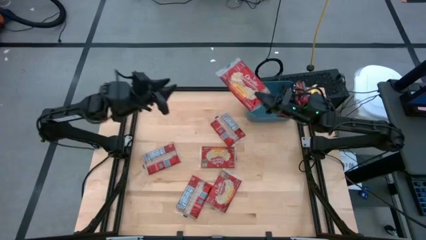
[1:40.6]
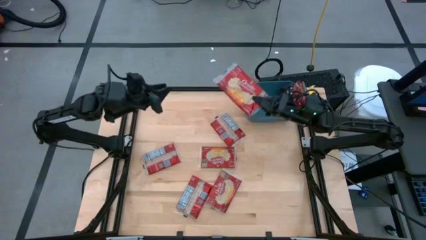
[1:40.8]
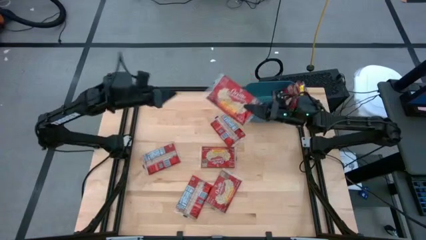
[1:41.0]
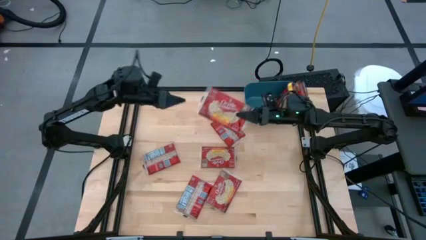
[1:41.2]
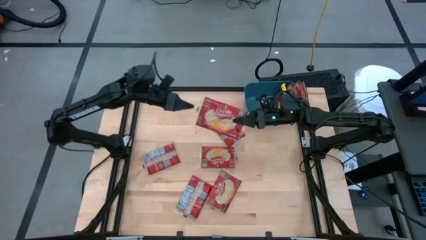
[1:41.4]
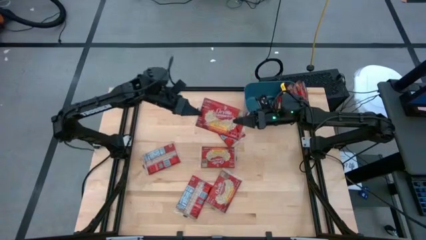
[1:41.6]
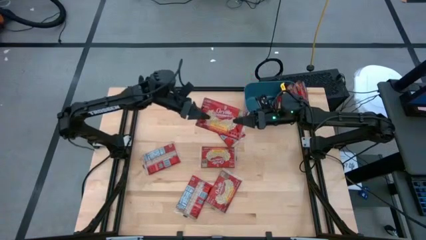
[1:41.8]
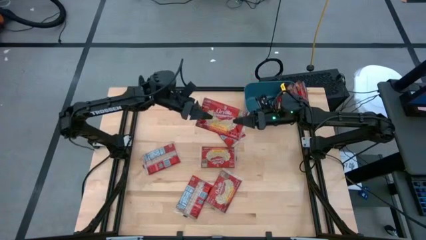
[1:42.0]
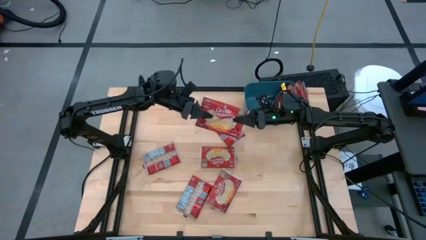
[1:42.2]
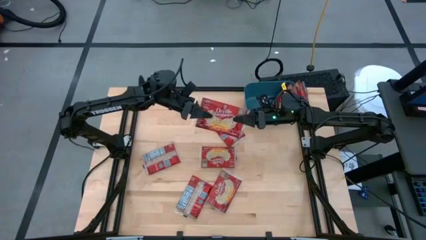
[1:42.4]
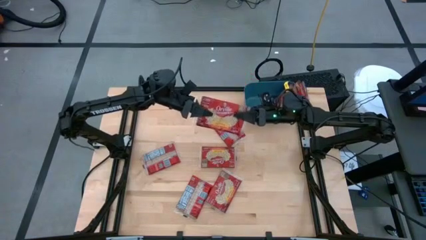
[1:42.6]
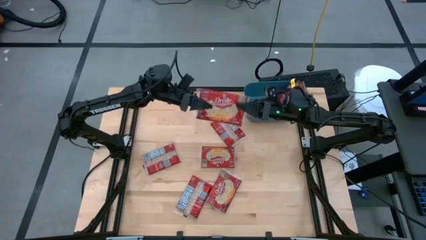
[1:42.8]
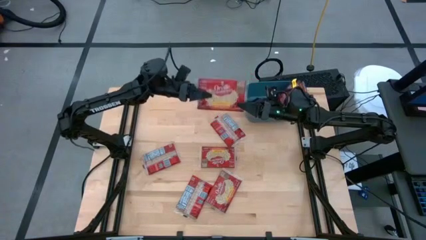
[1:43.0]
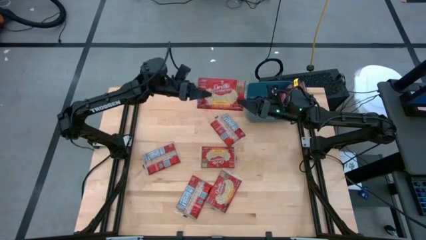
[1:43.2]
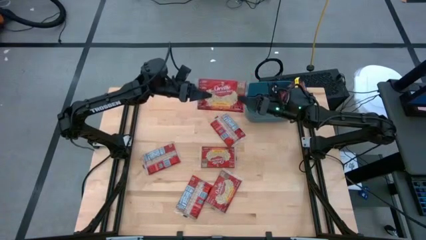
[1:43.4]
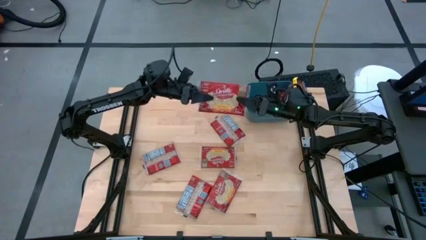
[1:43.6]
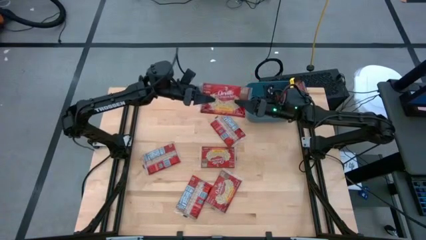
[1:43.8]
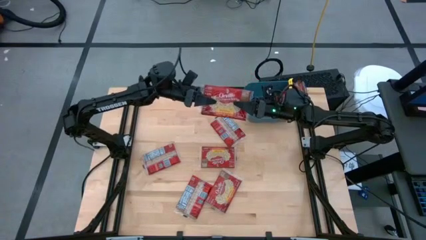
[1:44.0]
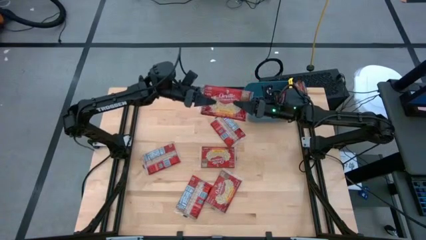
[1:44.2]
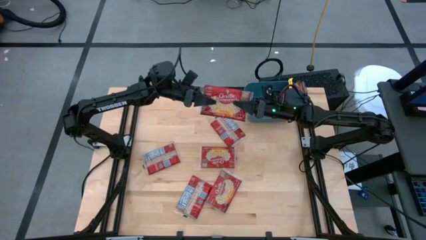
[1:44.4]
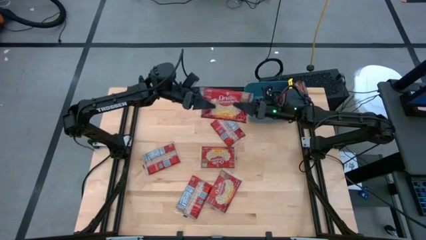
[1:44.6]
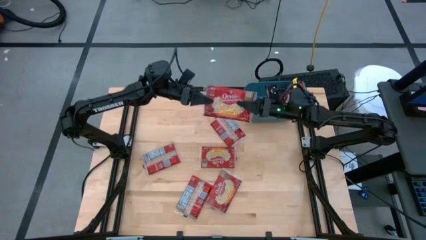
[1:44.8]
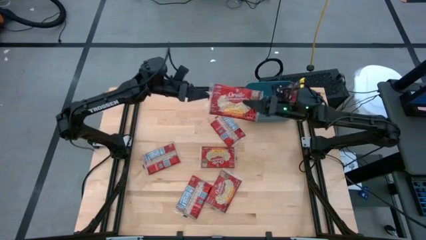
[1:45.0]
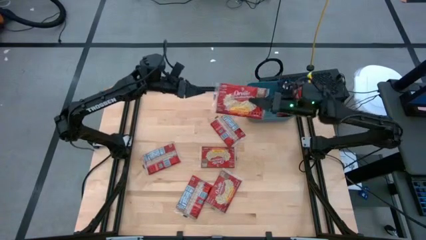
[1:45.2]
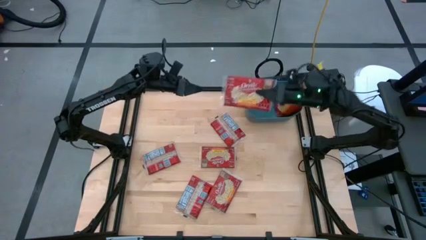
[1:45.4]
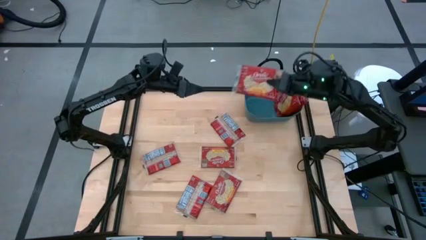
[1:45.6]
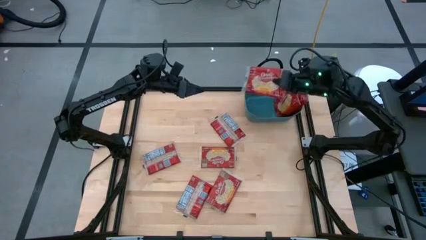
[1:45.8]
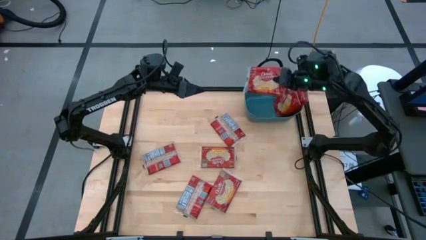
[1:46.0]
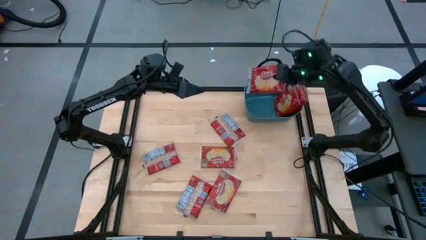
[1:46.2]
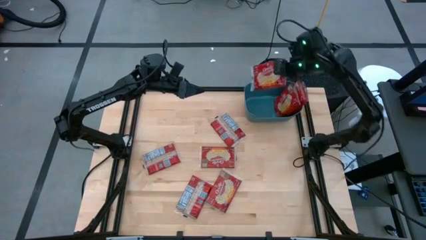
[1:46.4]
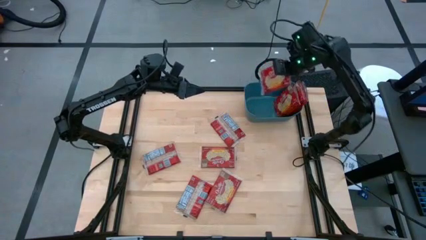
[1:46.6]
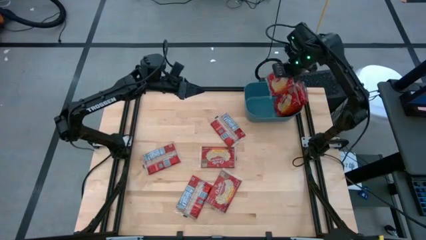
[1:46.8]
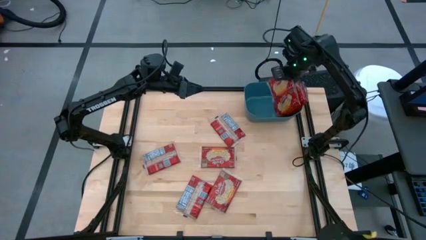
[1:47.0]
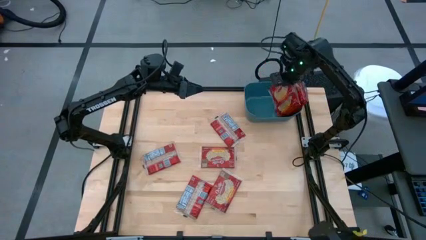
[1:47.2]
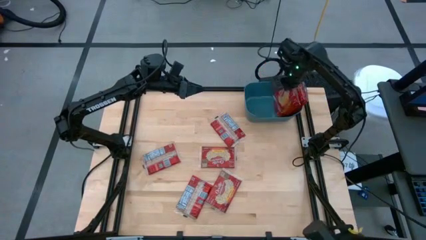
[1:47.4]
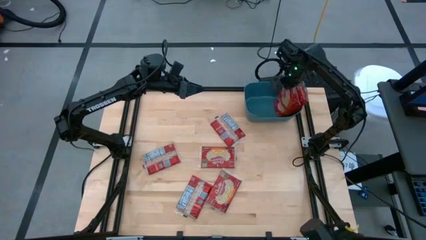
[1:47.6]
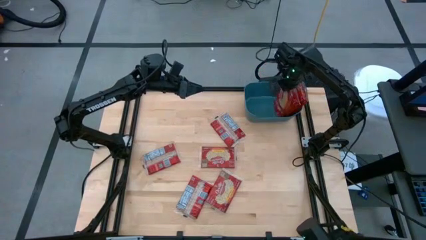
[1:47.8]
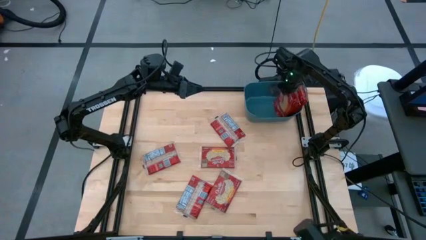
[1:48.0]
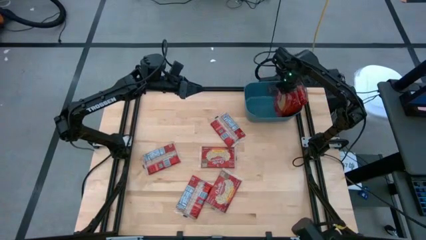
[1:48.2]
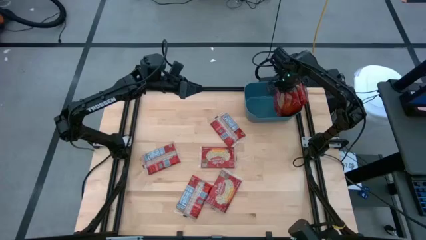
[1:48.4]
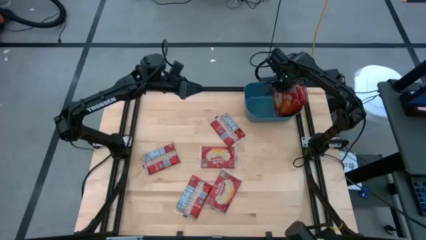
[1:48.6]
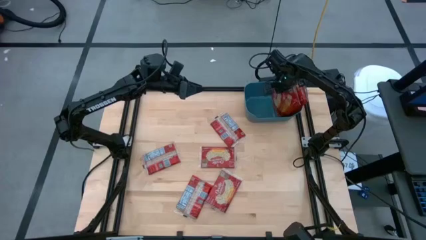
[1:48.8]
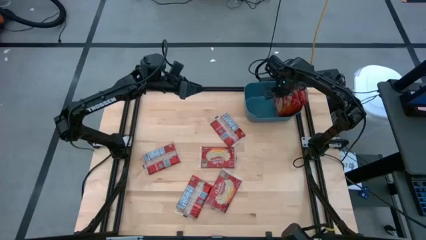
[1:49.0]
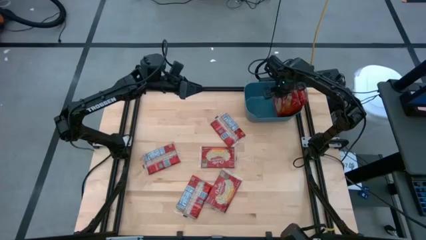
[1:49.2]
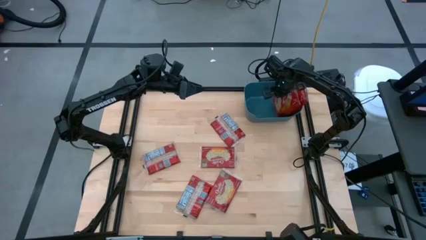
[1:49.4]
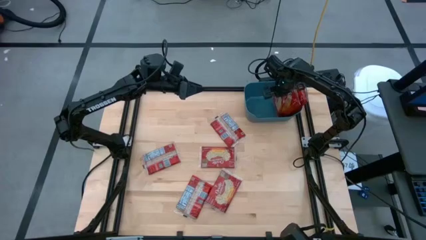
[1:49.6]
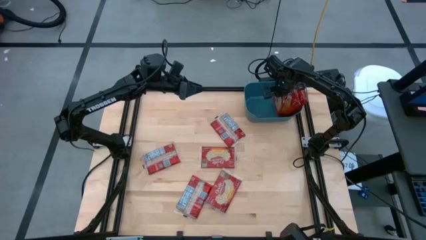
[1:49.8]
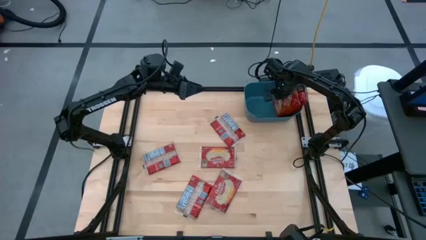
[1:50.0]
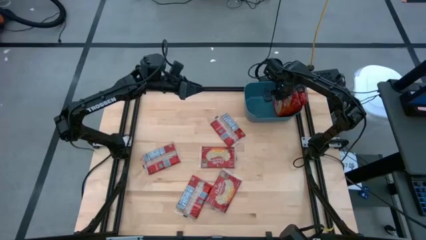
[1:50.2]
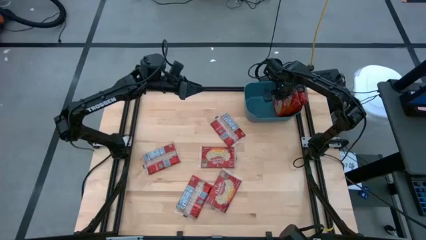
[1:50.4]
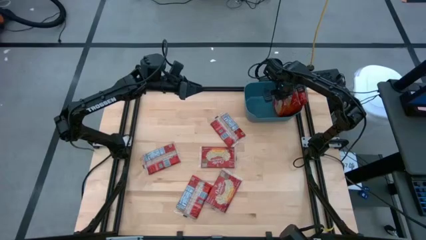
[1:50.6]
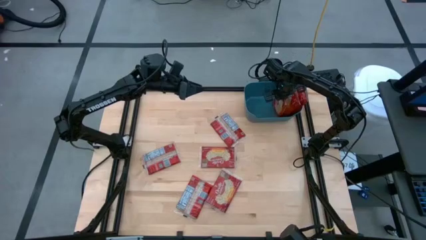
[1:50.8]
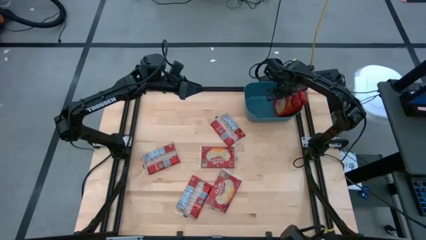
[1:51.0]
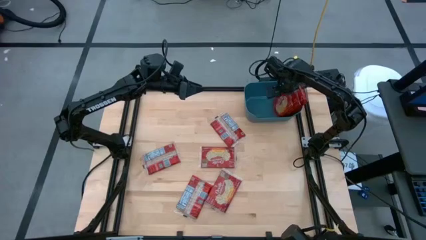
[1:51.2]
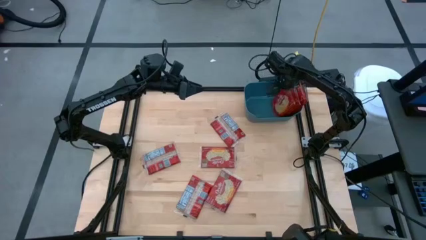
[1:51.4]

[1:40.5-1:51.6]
Task: Sort popcorn bags into baskets
Put the popcorn bag into the blue bin

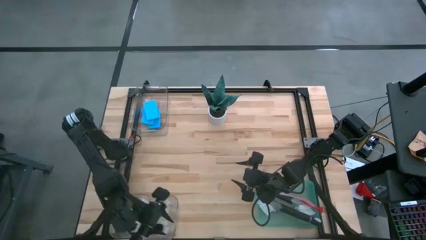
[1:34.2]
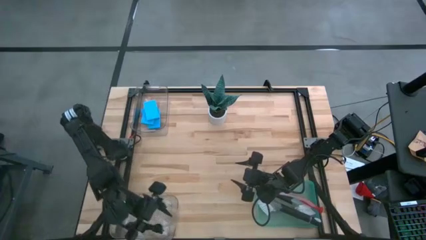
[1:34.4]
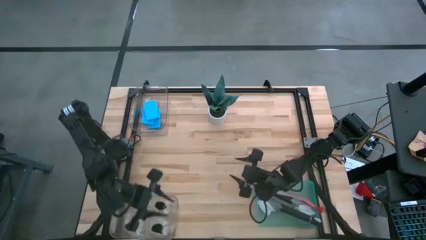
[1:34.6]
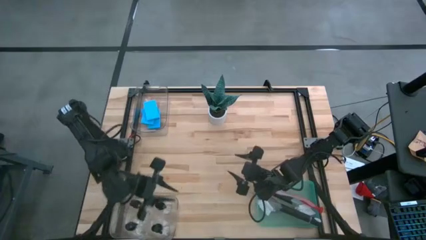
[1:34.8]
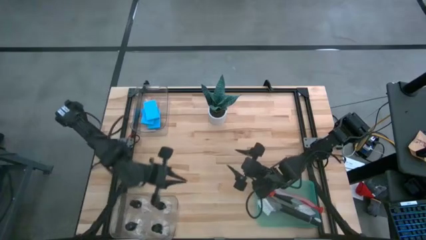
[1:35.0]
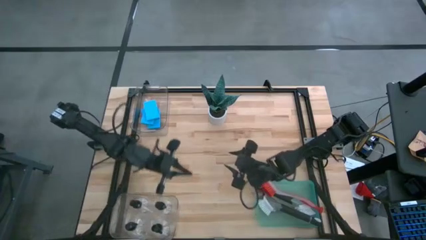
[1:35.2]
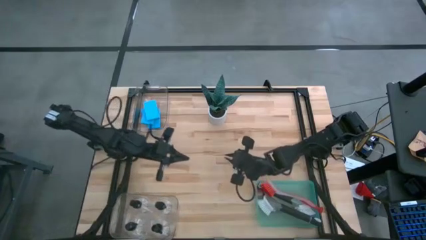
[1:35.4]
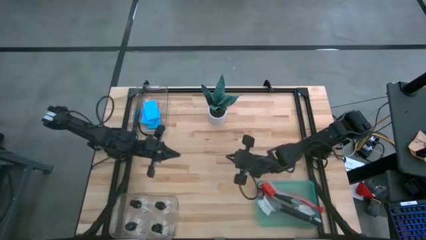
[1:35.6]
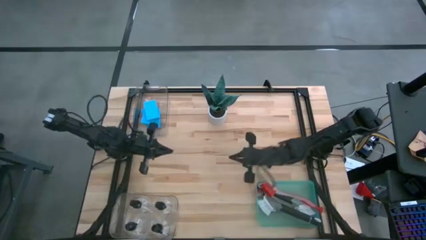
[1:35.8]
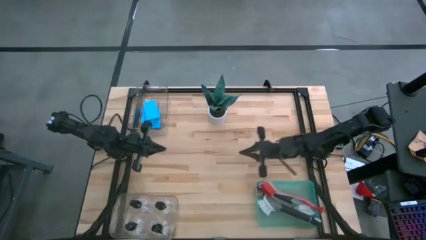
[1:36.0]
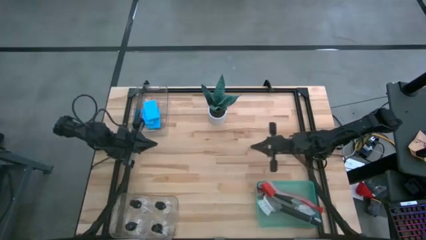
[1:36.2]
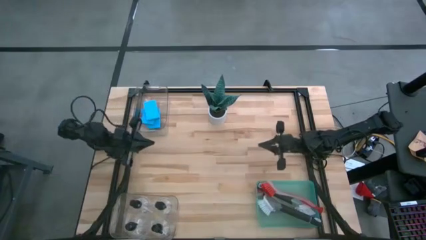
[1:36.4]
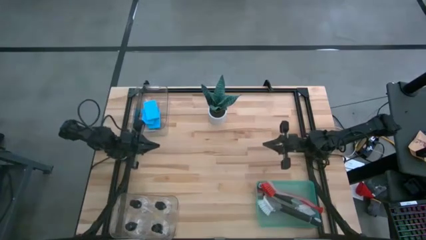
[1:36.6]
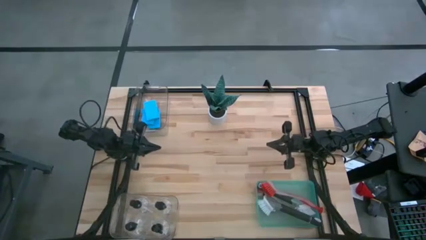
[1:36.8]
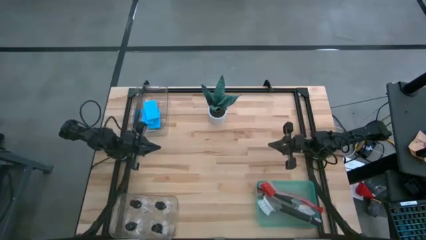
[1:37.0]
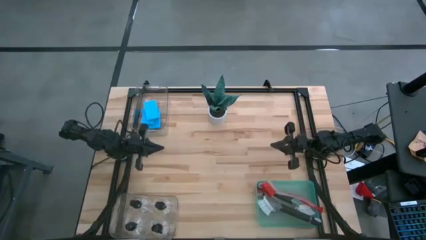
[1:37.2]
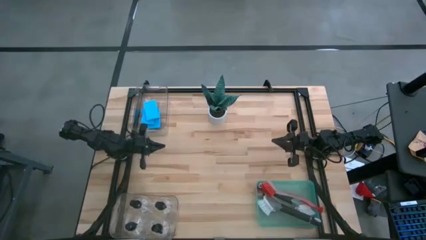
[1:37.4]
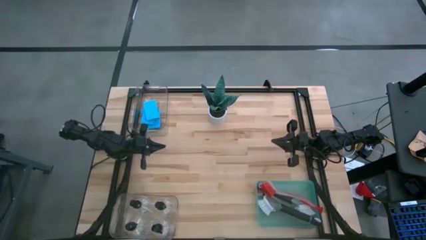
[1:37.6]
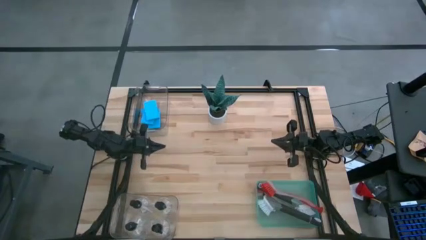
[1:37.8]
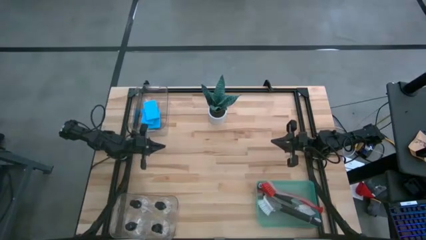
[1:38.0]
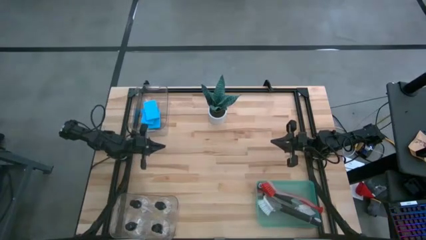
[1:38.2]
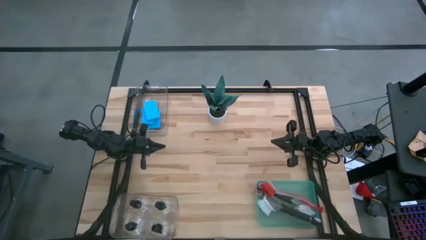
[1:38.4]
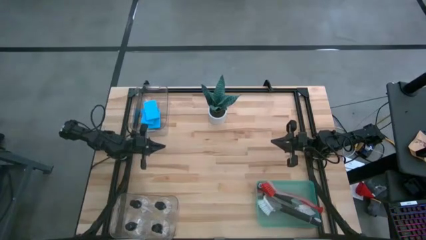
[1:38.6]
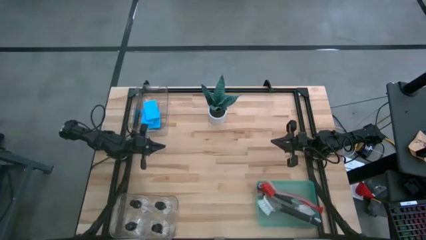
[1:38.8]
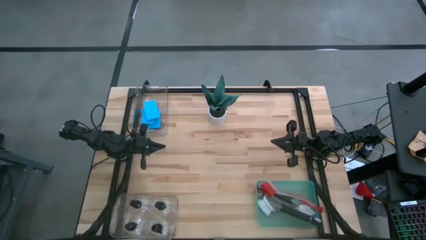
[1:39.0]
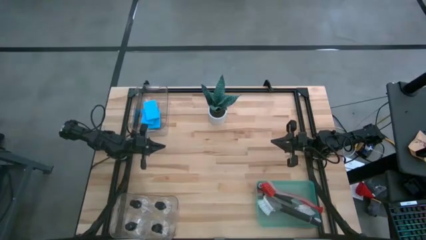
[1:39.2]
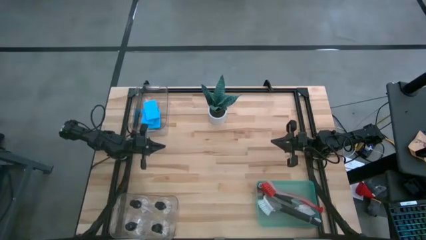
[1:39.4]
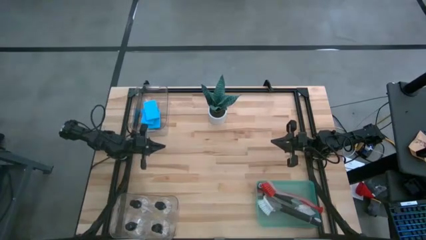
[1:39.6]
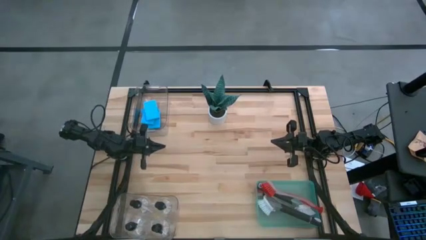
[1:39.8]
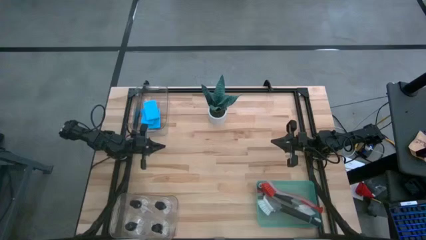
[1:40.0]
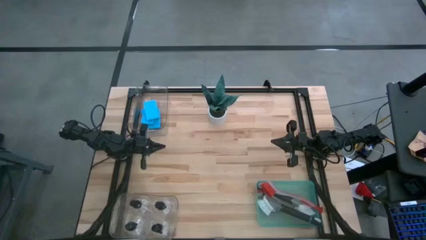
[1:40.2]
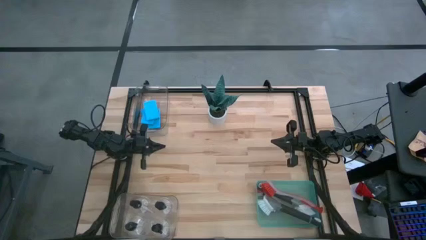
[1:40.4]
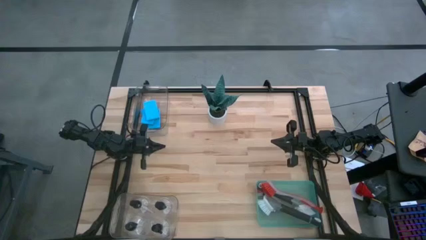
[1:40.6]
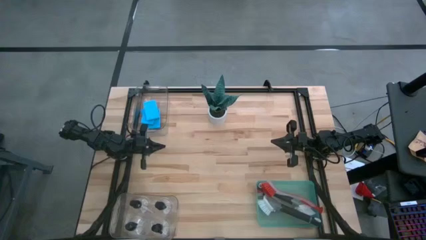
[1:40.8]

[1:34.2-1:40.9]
Task: Pick & Place Kitchen Sink Supplies
Return to Home Position
